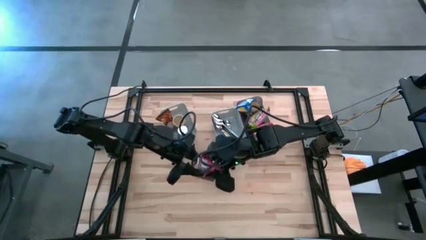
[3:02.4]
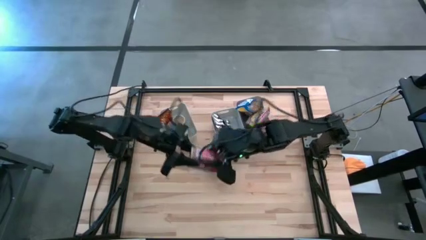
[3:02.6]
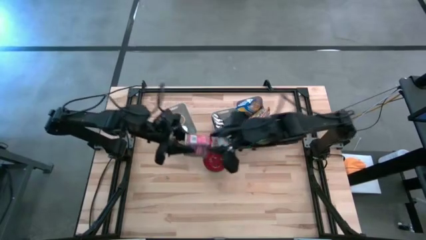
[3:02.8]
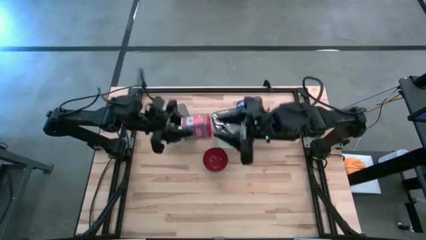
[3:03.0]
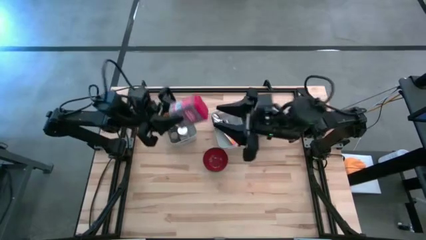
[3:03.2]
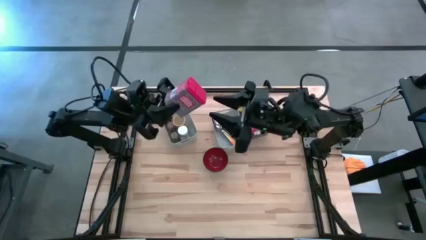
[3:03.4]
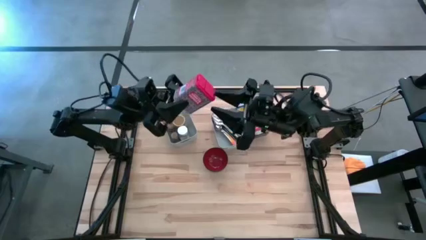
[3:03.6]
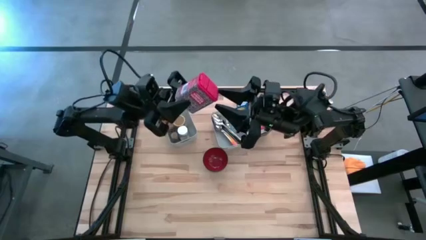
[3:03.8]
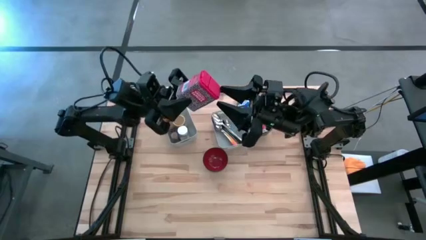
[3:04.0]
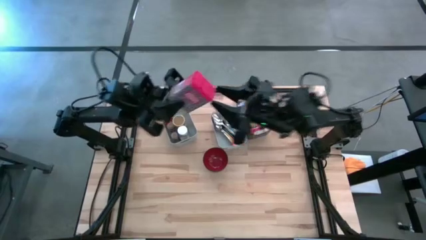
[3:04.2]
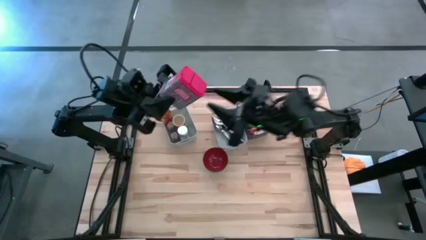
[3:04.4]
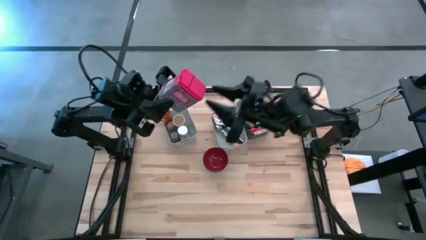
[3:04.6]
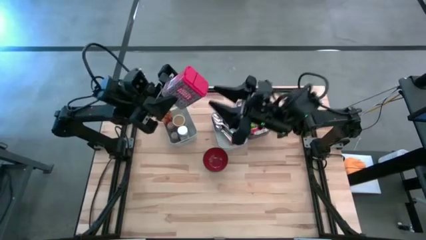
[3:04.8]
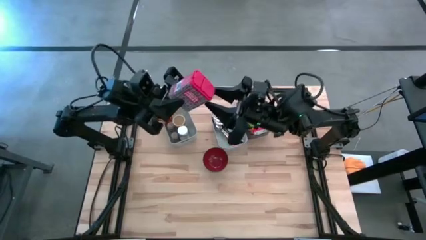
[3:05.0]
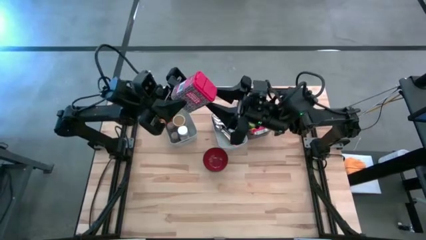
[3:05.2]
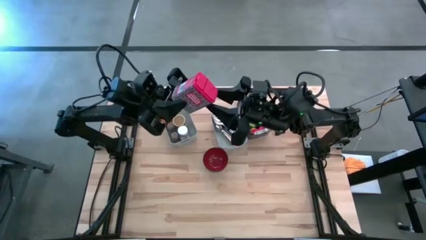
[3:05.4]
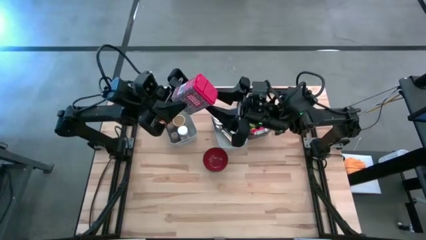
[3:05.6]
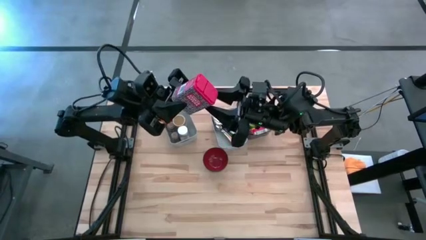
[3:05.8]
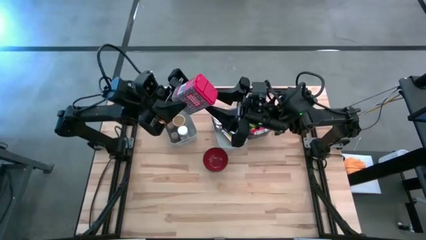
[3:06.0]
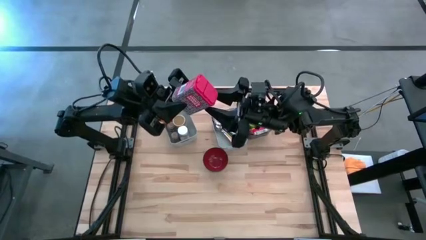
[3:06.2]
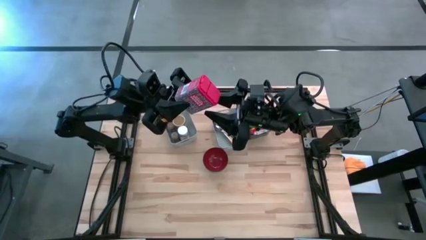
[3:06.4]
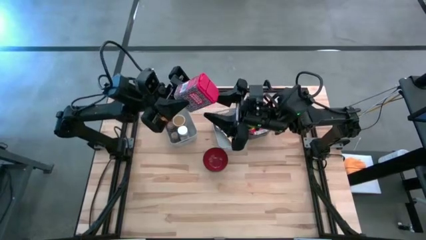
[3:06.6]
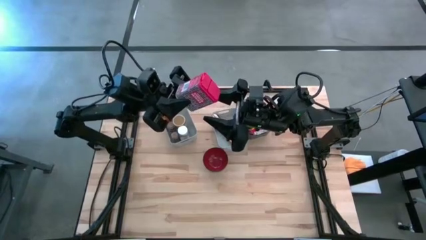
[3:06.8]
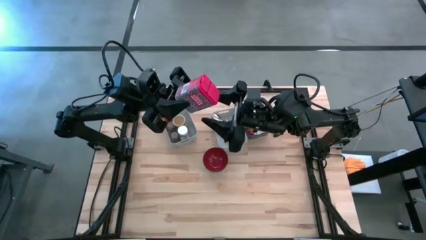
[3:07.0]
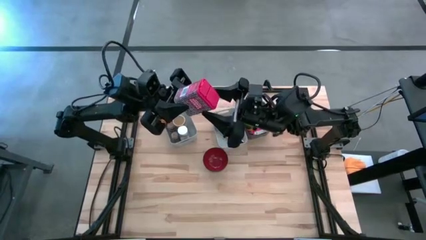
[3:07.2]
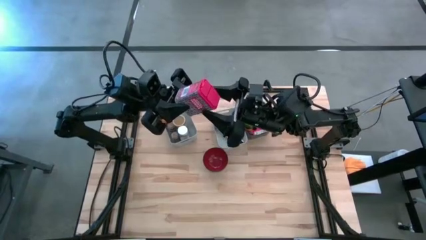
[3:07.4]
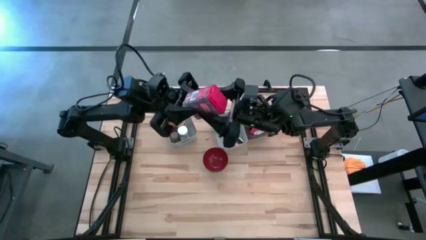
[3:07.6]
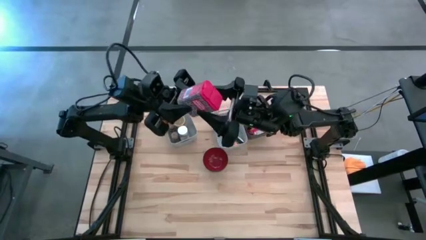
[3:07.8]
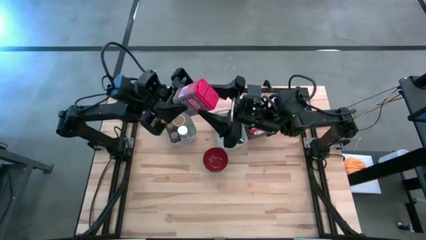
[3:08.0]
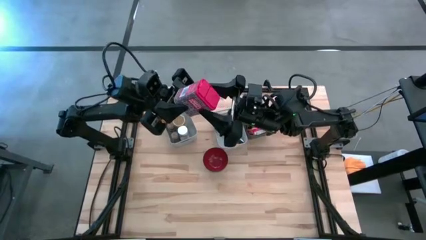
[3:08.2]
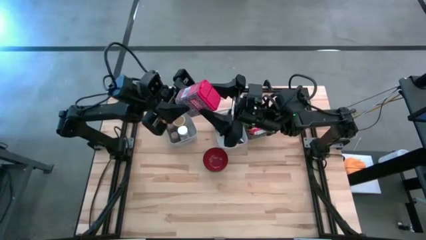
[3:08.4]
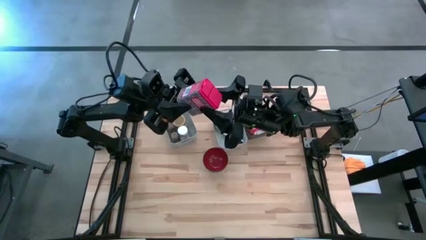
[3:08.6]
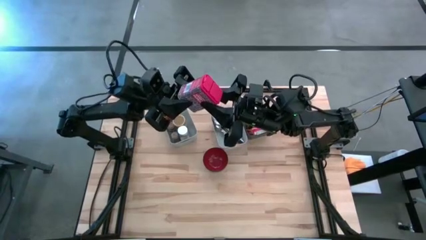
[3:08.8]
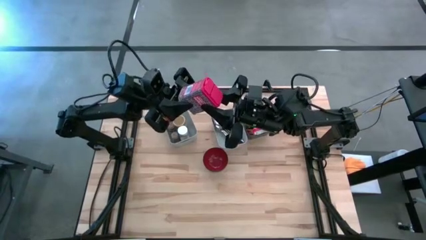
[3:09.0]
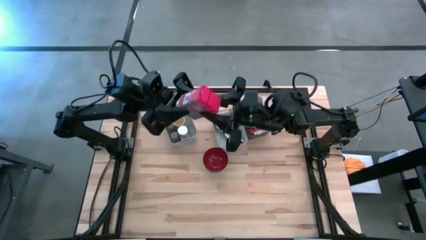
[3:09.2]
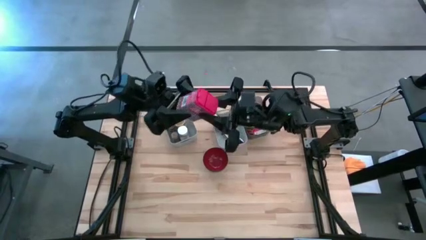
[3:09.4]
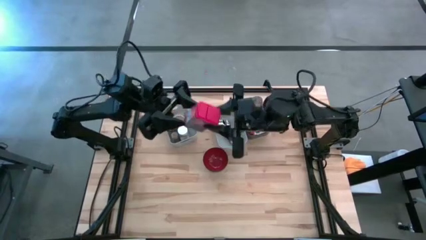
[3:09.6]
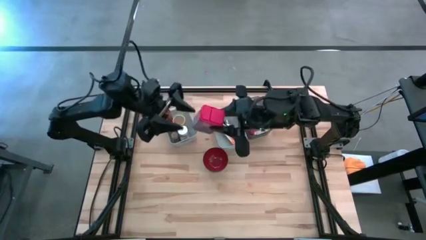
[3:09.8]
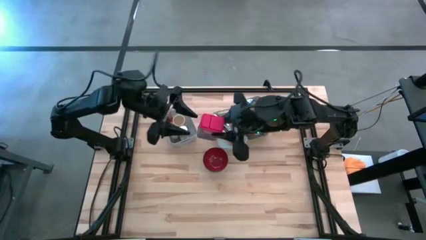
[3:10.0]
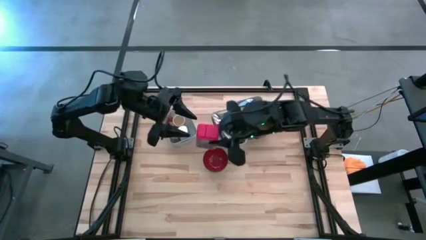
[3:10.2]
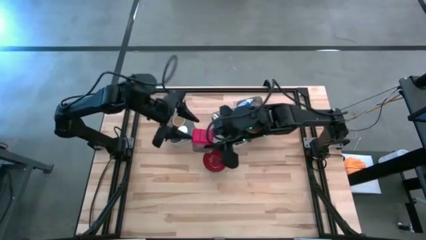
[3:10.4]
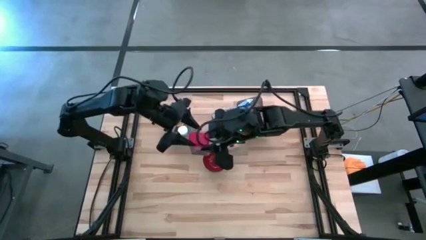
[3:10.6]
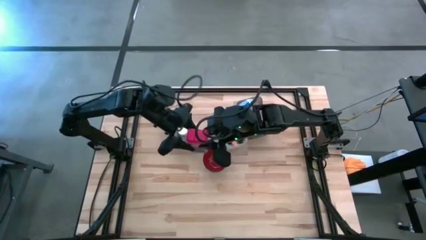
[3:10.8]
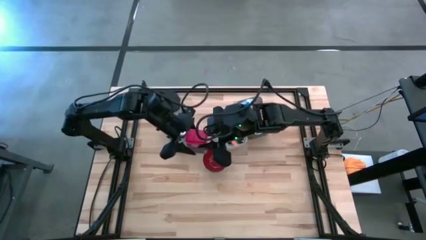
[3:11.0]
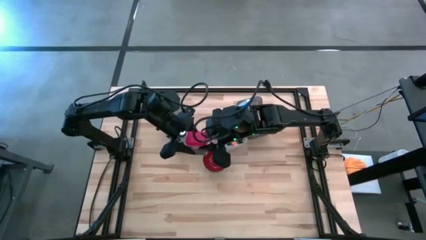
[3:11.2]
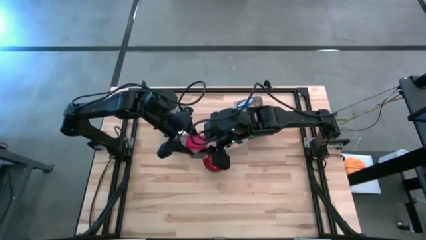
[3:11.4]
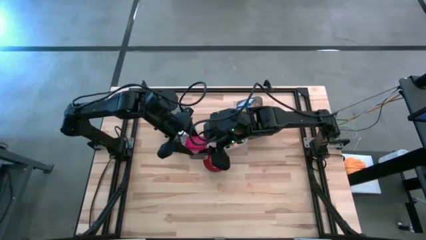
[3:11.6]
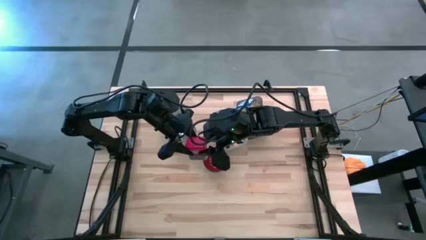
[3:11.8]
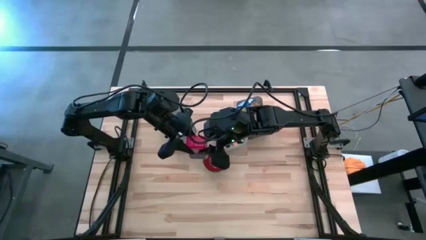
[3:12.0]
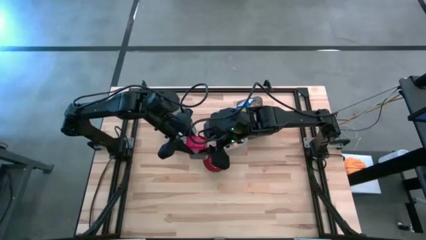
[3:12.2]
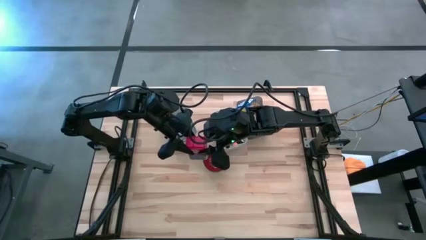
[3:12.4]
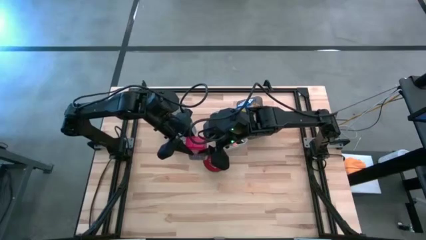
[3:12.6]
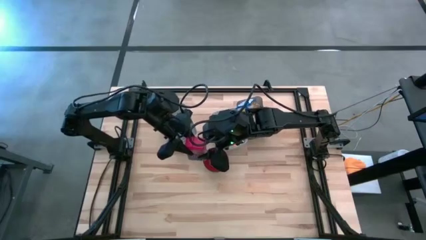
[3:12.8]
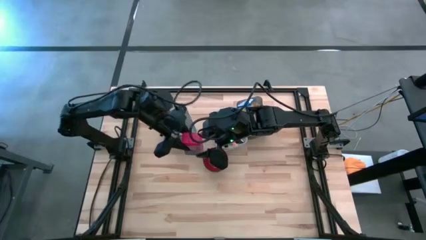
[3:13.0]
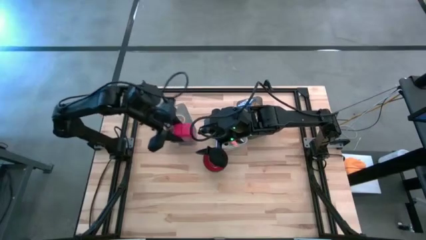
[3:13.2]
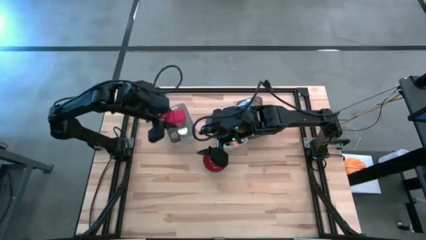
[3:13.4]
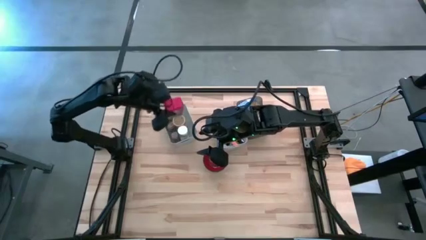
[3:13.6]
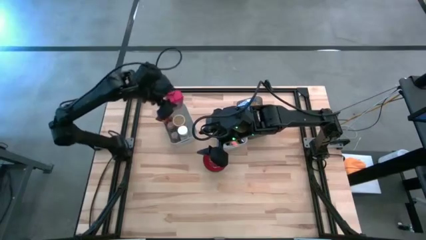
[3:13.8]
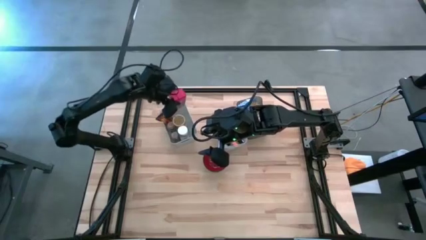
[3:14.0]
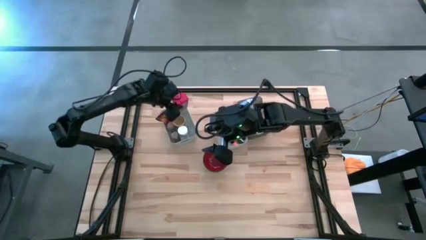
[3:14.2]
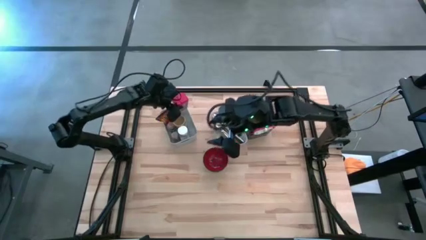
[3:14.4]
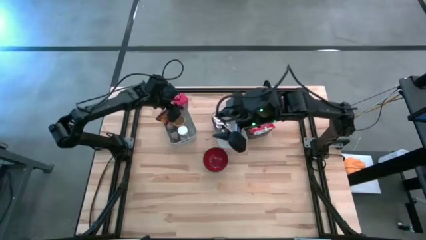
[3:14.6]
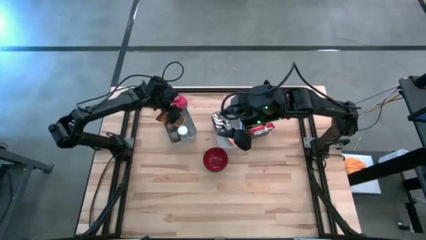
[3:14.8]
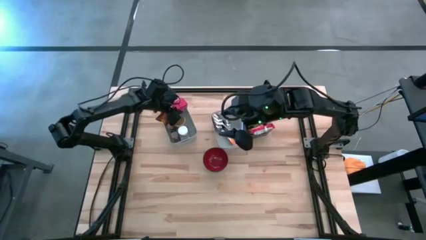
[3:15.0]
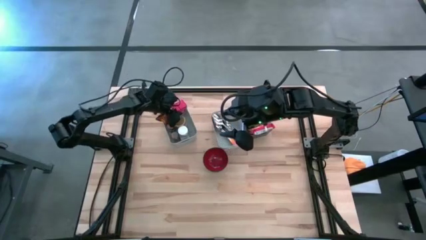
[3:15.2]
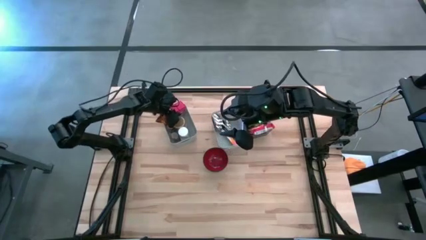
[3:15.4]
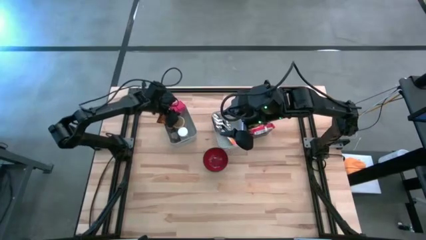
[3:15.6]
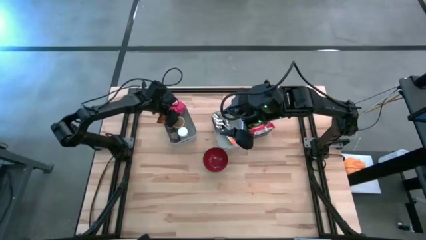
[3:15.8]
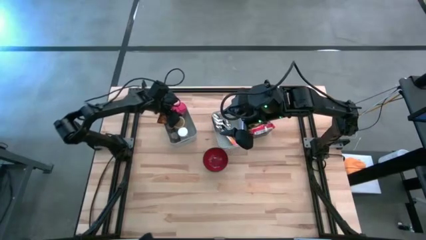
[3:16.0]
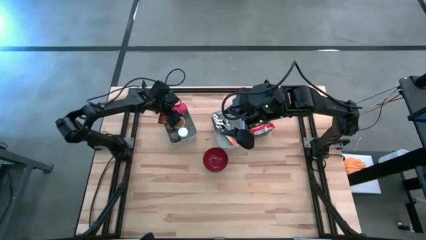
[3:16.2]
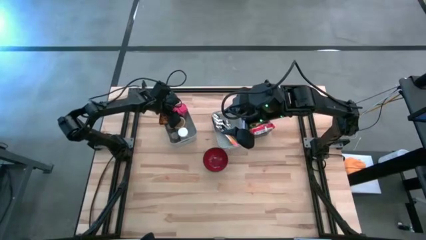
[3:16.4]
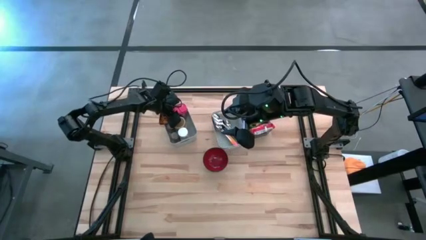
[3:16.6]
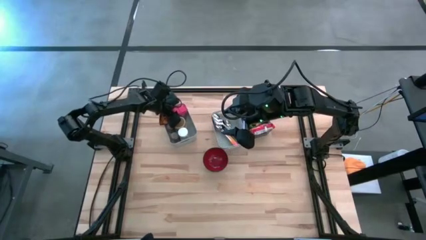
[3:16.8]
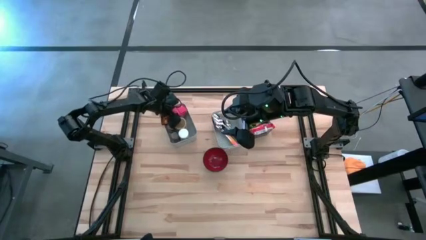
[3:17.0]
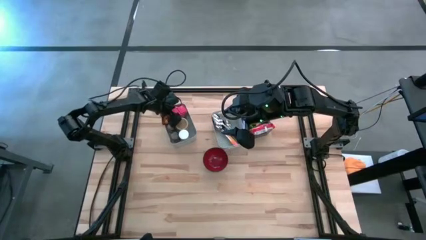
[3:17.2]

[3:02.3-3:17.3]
Put the red seasoning can into the left white bin
